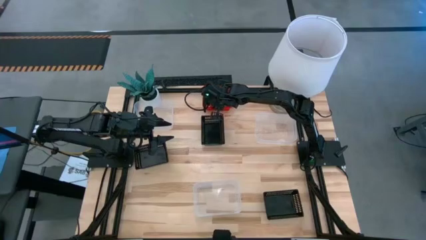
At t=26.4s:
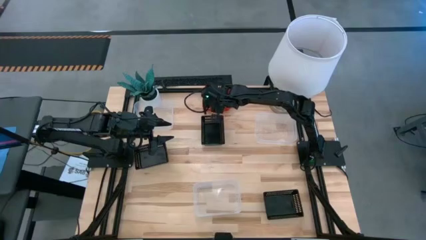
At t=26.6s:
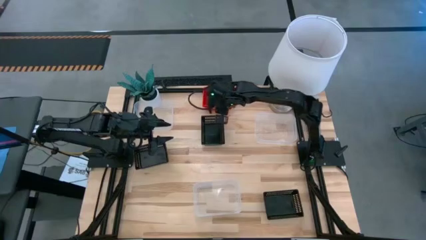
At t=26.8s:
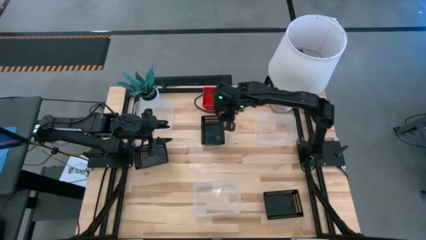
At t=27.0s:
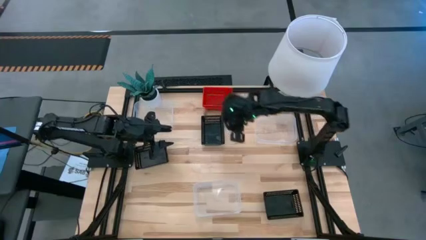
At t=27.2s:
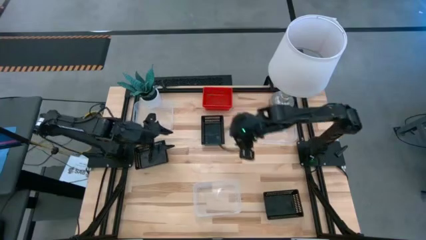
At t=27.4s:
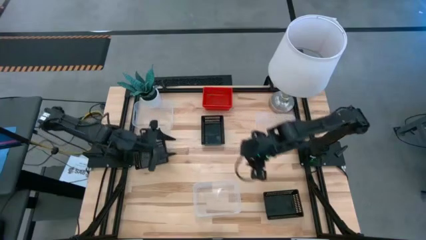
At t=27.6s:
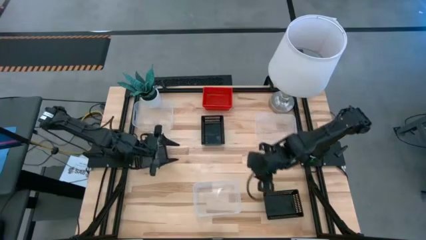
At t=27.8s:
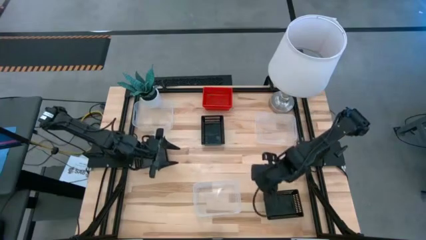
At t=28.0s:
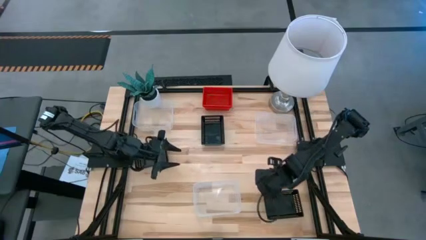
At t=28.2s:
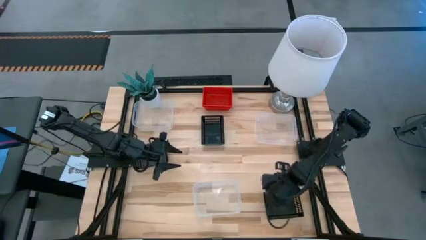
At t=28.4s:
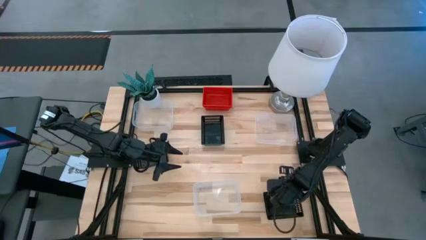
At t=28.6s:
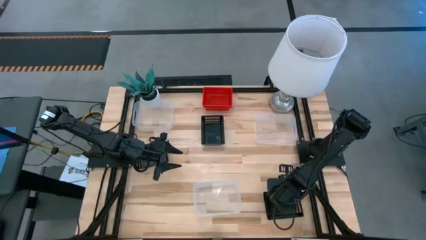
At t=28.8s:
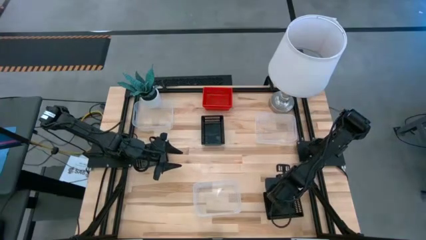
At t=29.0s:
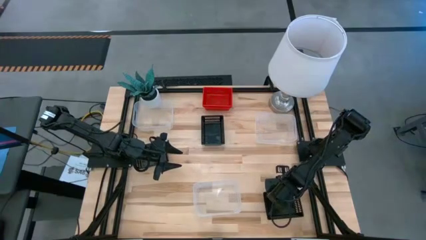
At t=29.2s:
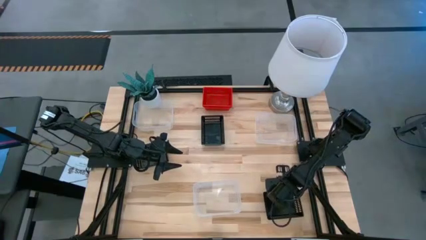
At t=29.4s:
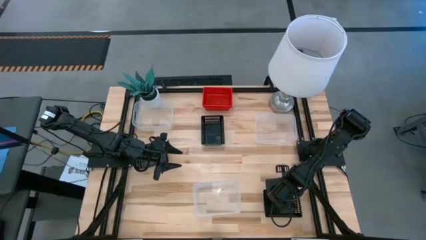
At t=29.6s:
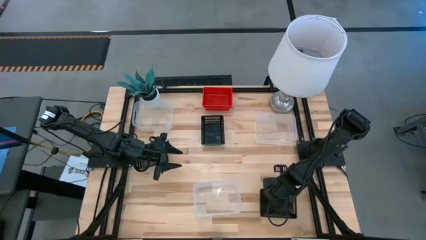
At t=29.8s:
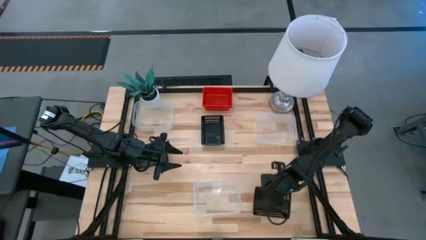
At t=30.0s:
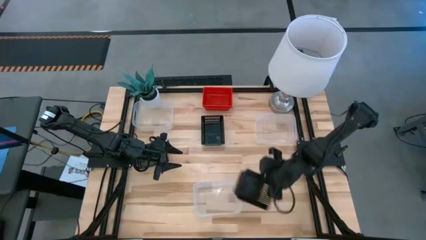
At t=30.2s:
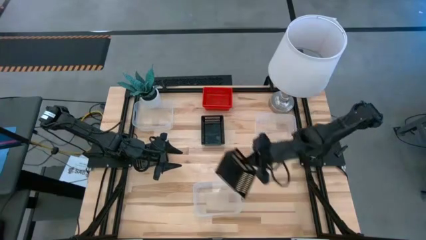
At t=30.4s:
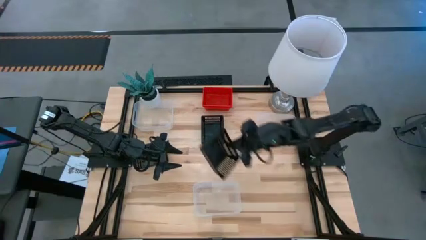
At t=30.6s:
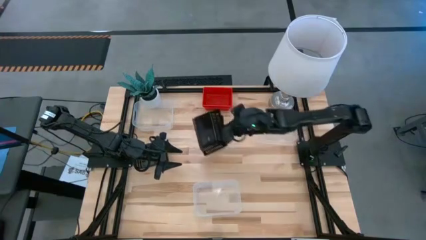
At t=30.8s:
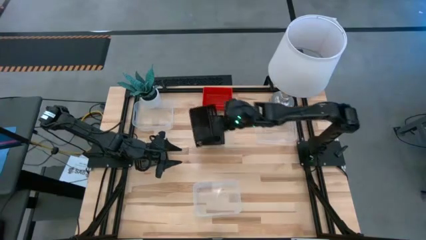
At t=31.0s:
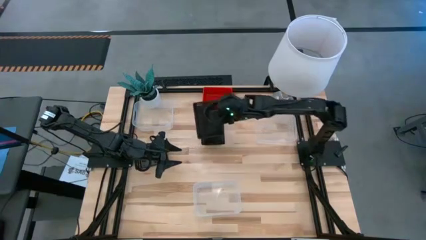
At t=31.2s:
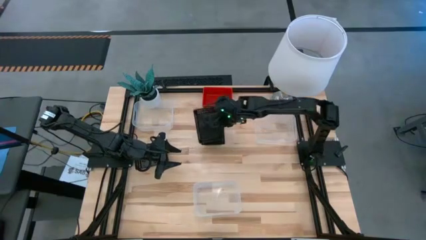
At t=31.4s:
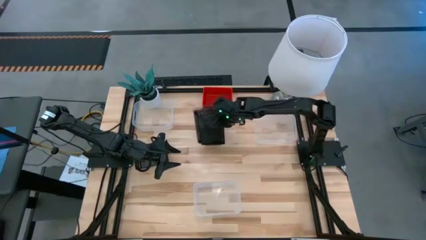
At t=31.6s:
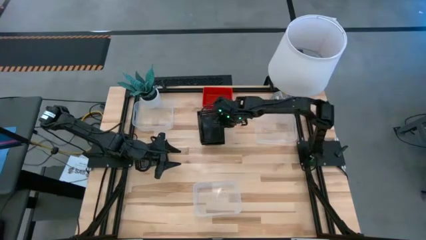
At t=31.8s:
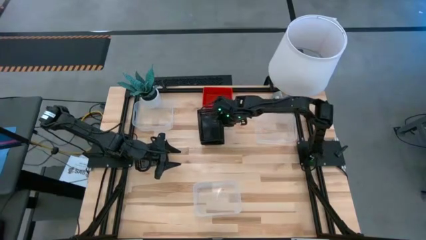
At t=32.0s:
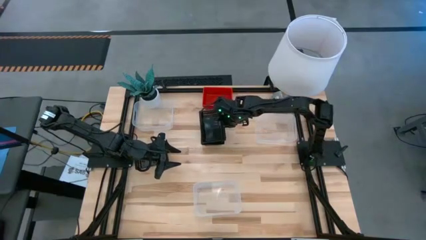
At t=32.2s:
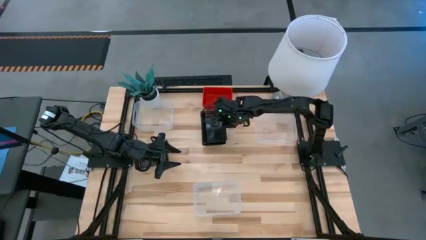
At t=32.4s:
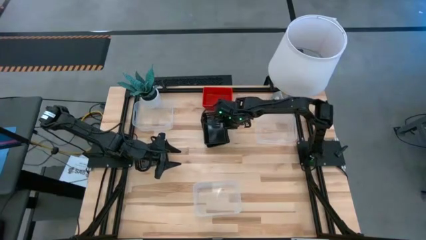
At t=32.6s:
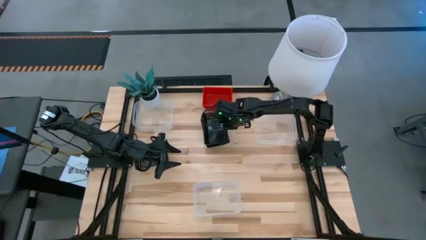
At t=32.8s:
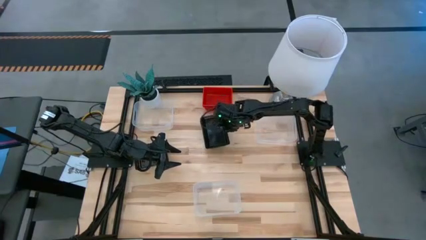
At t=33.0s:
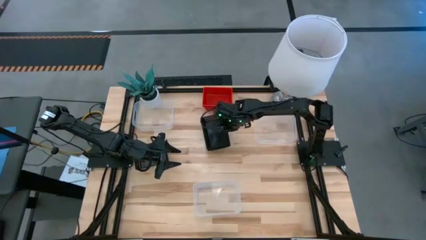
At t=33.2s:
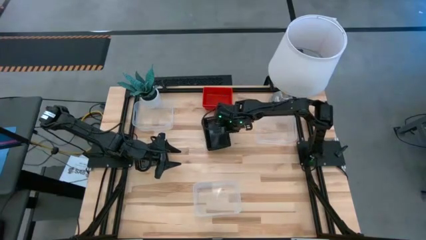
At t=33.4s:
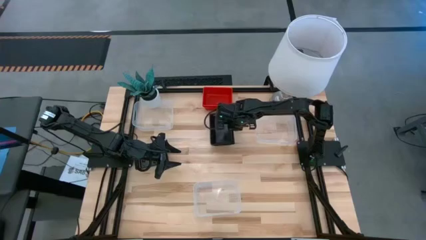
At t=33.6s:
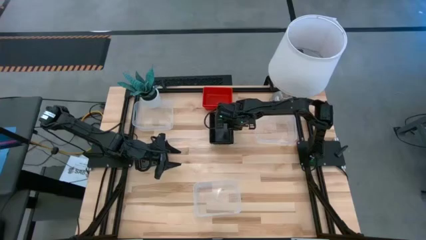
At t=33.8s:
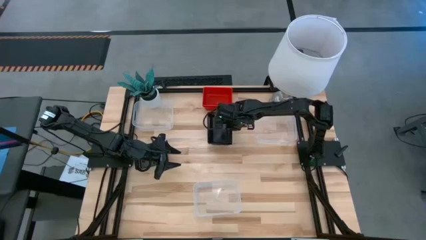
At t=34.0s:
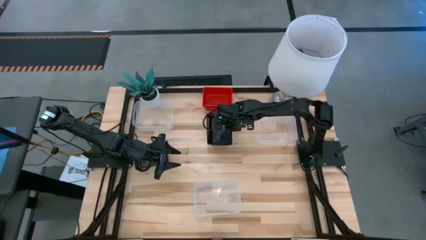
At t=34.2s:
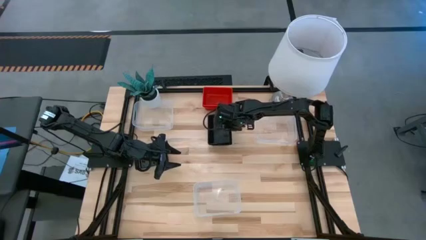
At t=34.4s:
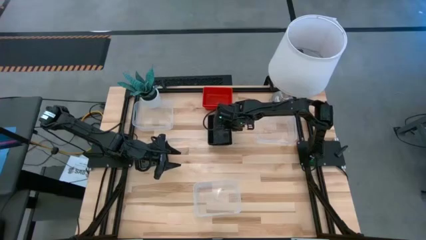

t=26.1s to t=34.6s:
Stack the bottom black bin on top of the top black bin
